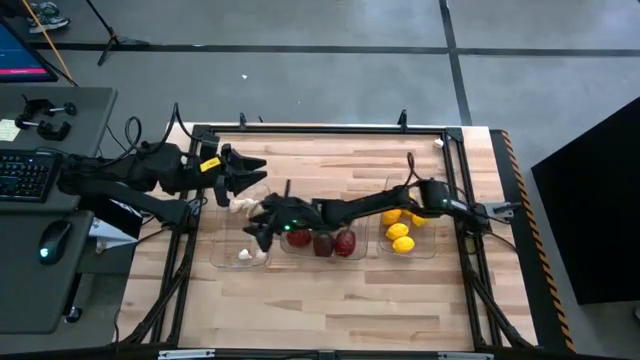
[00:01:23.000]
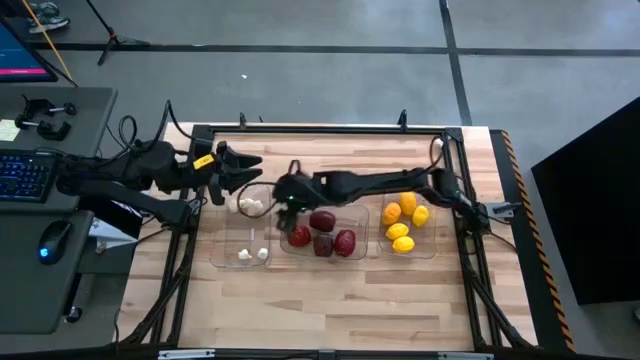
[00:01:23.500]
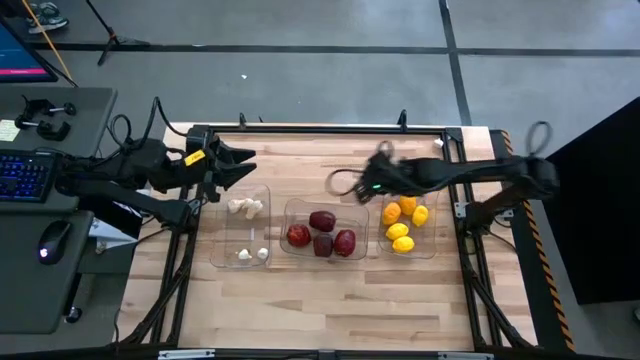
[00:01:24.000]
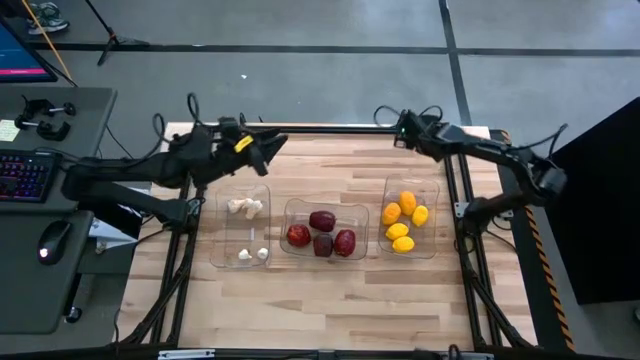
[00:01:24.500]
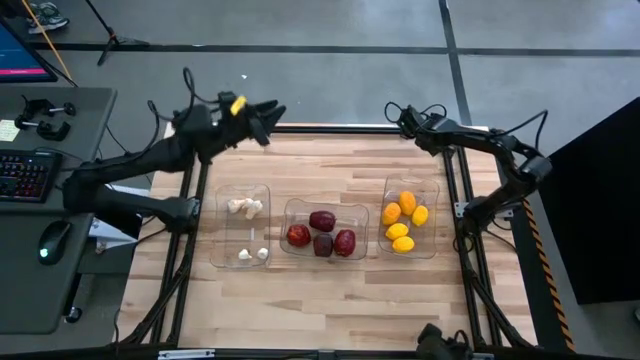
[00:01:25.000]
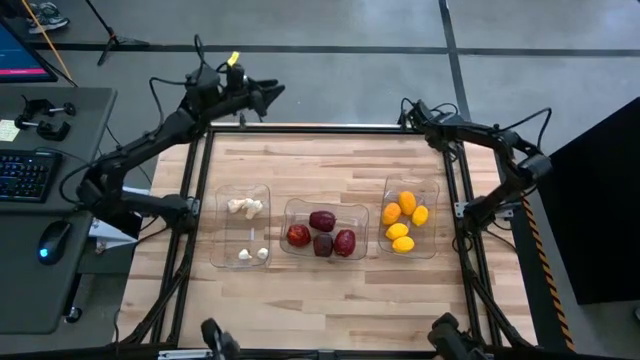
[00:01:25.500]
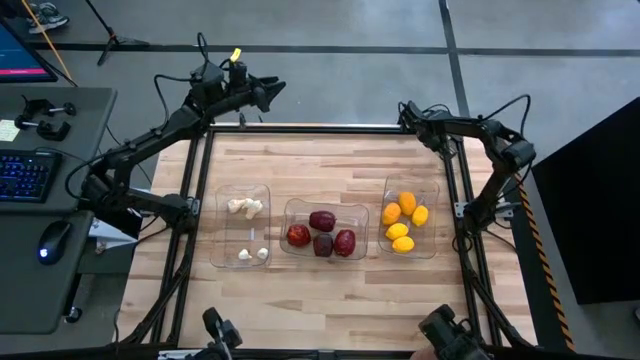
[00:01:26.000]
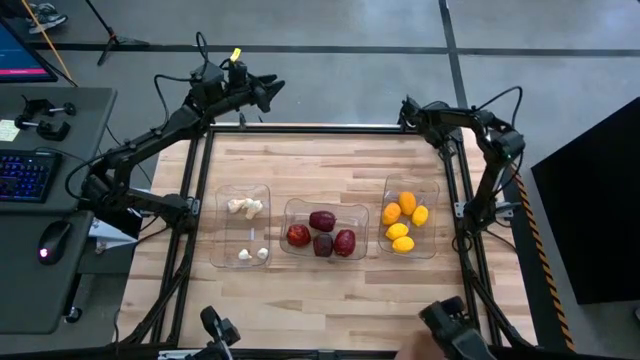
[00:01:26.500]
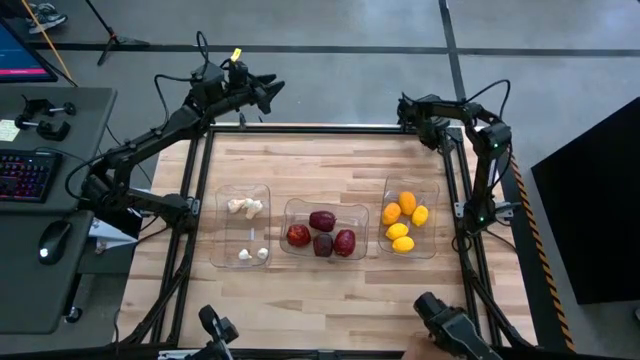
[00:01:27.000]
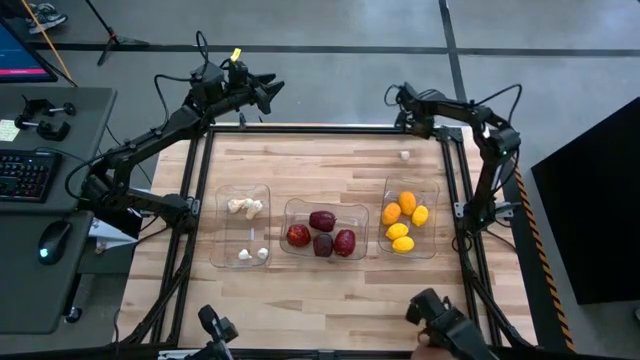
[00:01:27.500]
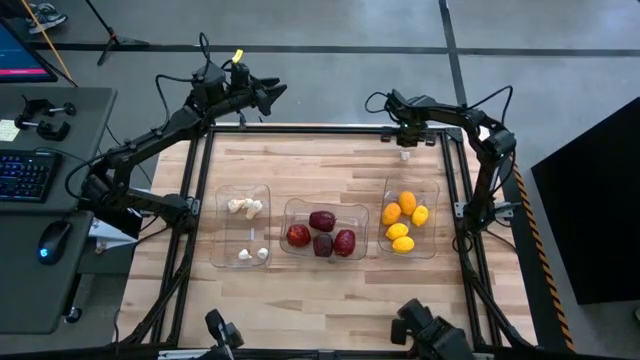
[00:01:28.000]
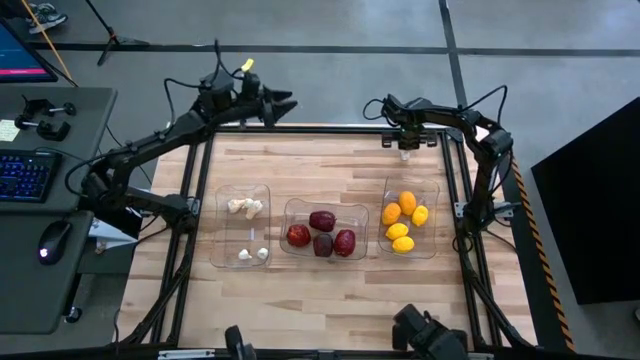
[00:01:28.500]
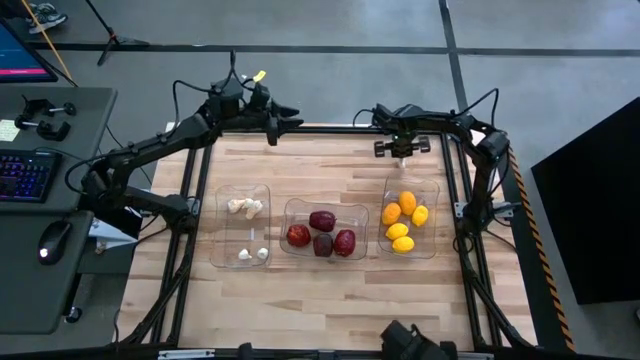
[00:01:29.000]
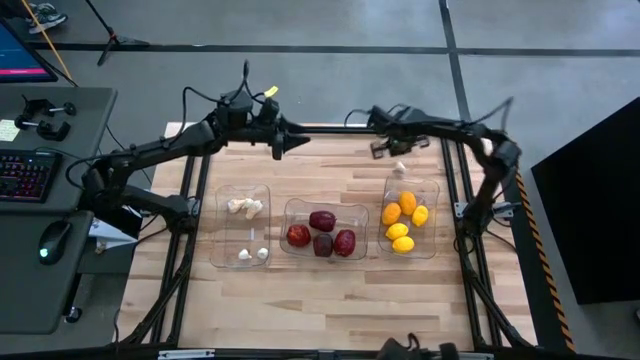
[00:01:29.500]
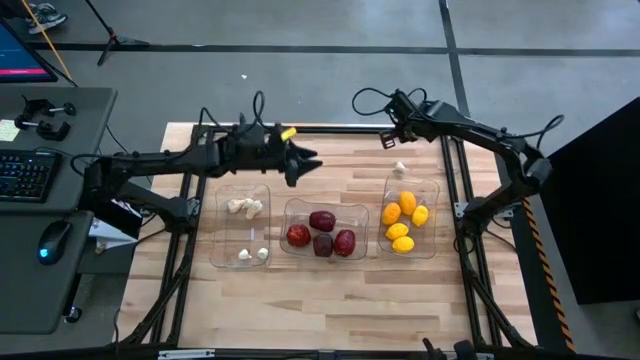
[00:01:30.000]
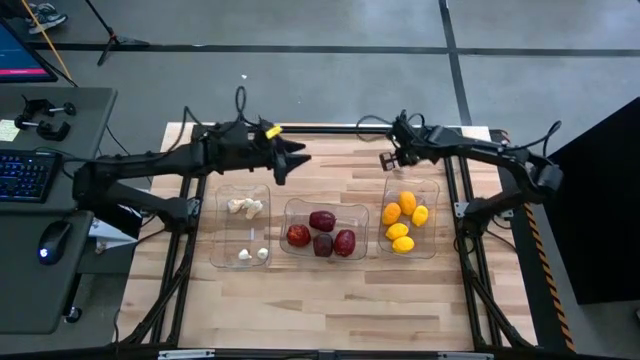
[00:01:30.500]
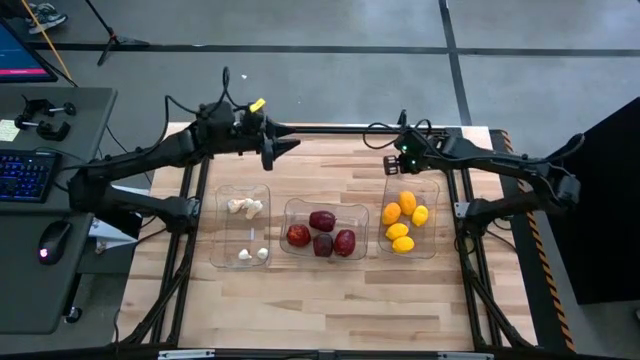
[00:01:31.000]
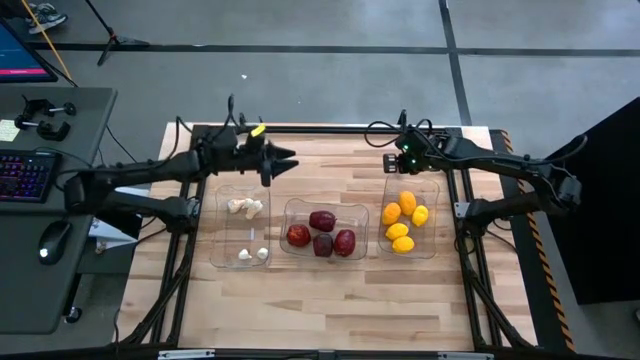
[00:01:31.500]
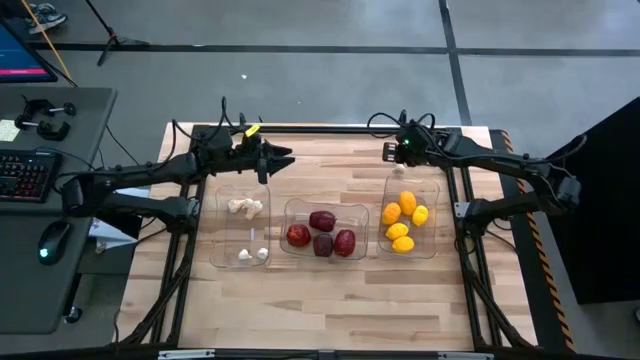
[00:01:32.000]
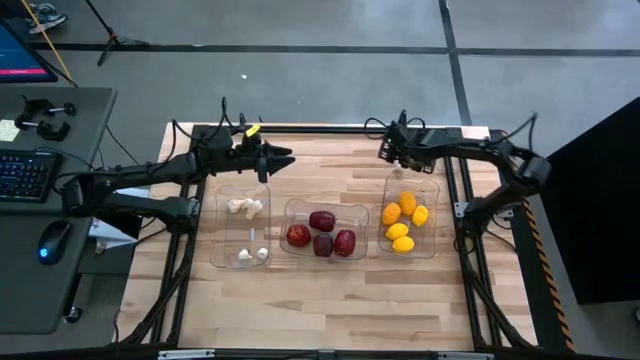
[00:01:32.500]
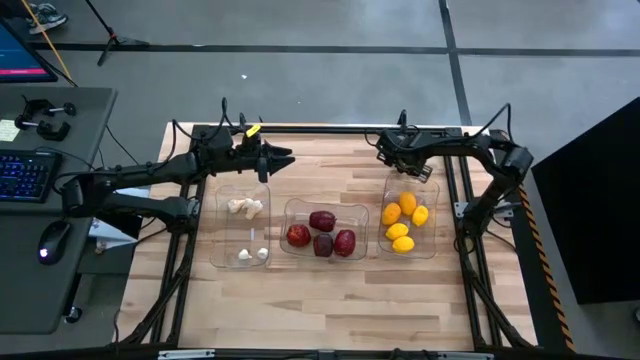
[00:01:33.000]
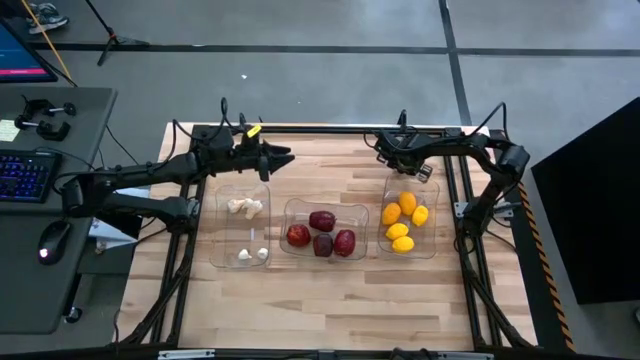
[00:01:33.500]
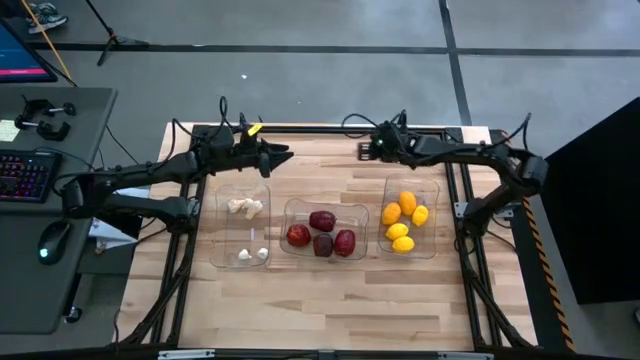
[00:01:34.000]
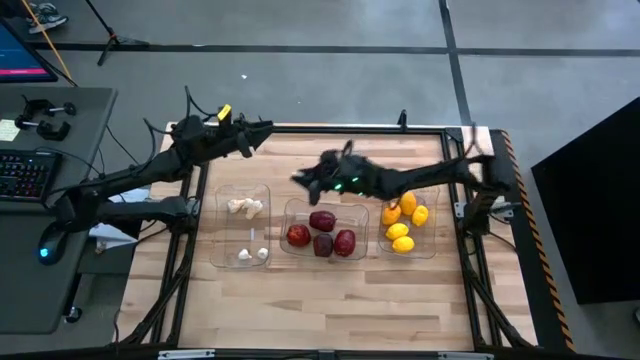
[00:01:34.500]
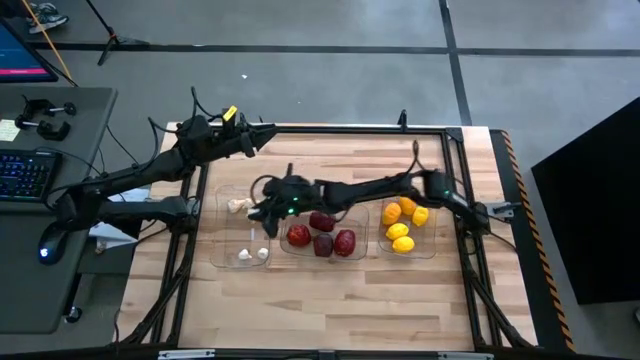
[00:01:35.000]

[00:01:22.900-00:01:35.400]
Task: Sort produce into baskets
Put the white garlic into the left transparent bin

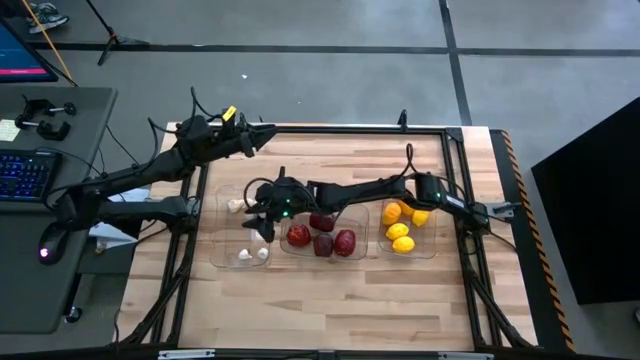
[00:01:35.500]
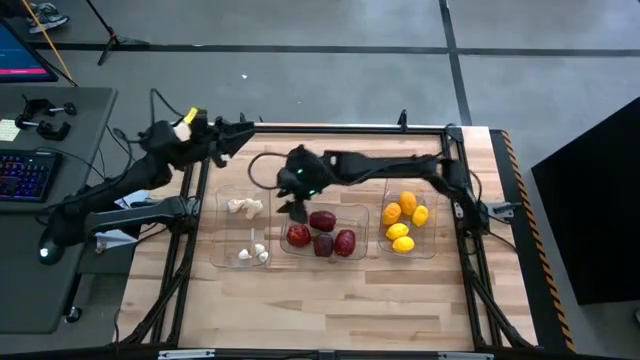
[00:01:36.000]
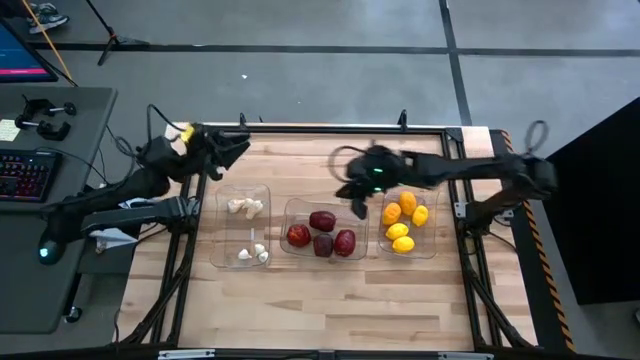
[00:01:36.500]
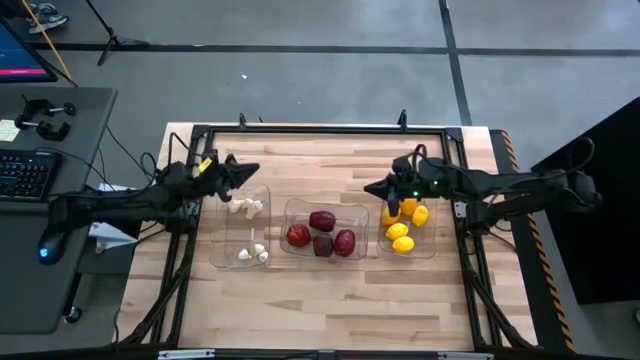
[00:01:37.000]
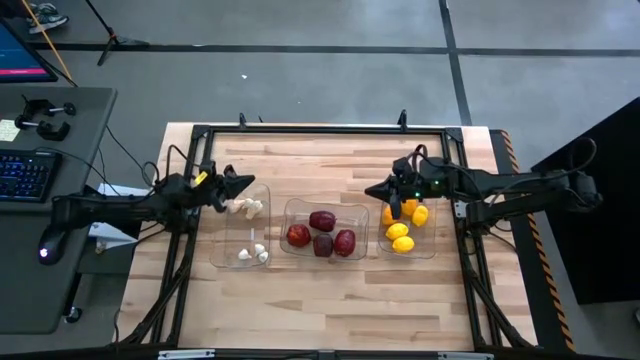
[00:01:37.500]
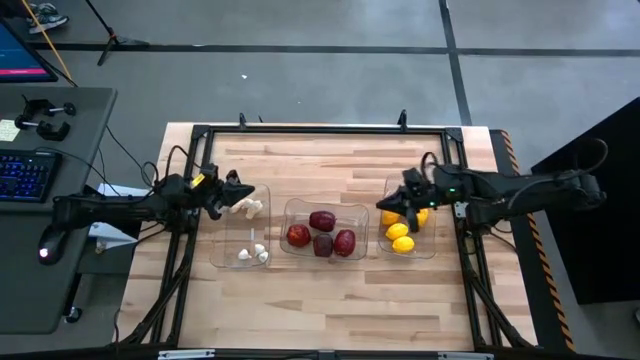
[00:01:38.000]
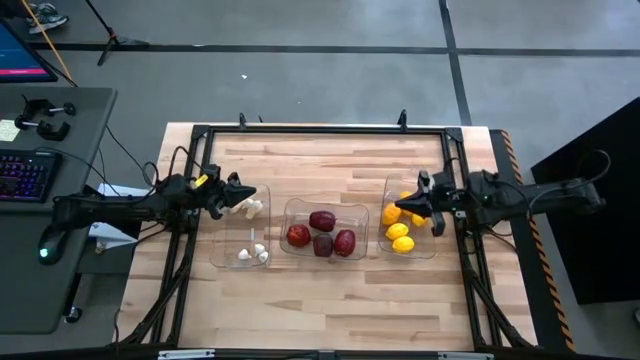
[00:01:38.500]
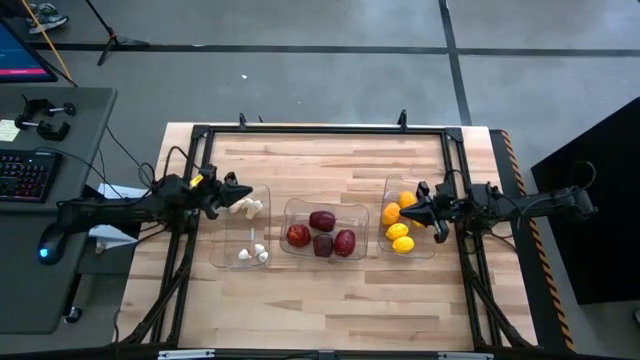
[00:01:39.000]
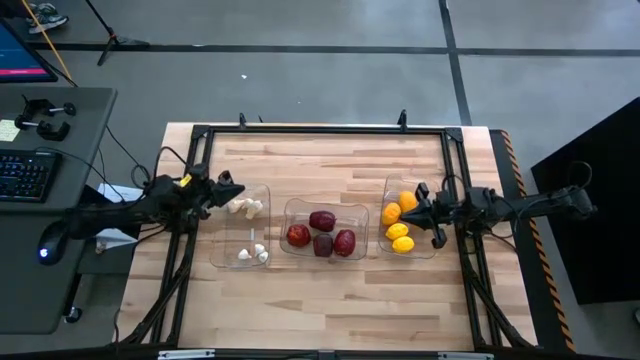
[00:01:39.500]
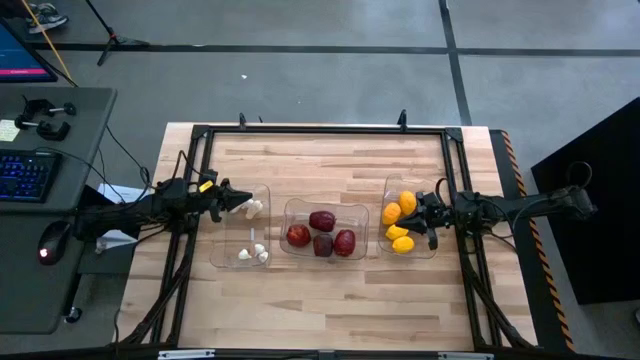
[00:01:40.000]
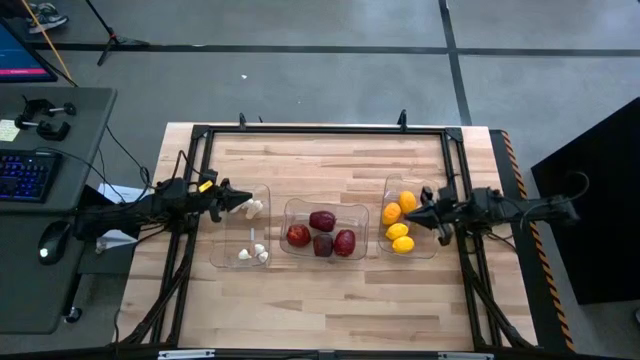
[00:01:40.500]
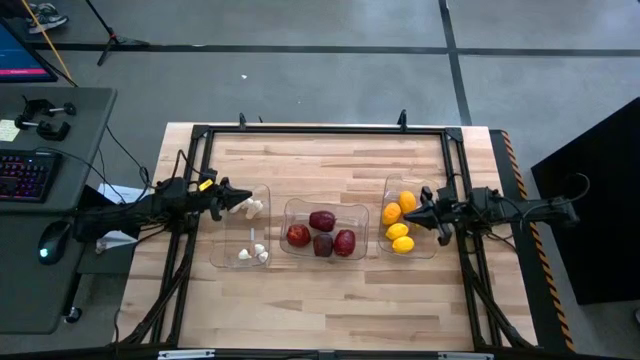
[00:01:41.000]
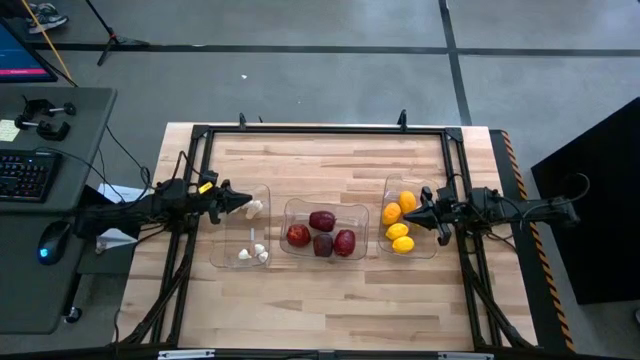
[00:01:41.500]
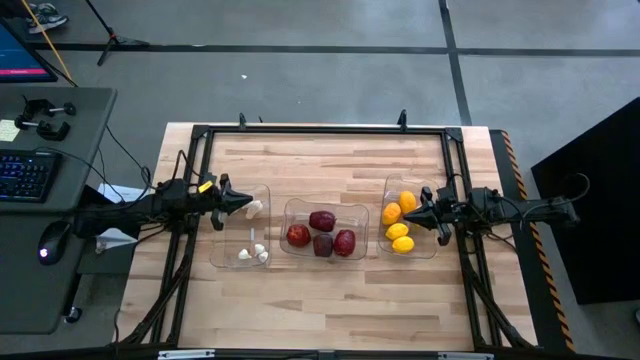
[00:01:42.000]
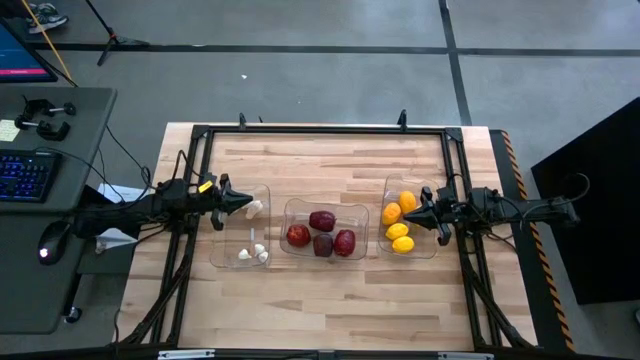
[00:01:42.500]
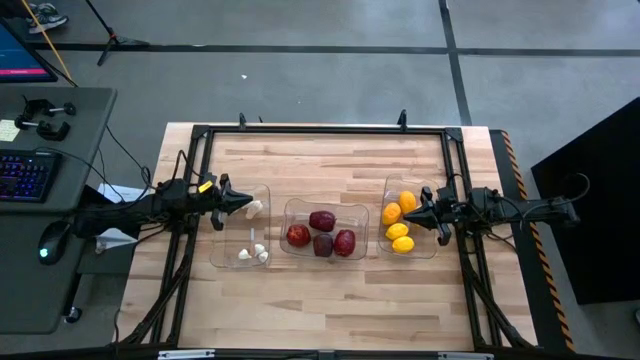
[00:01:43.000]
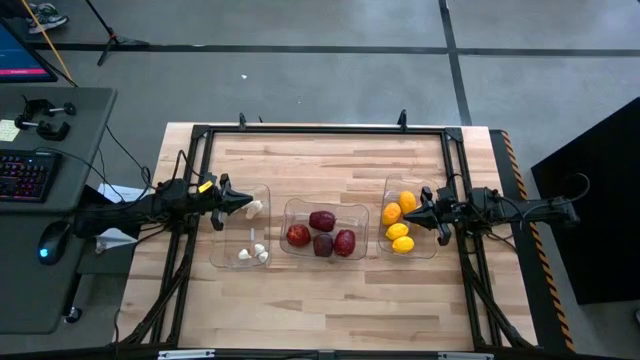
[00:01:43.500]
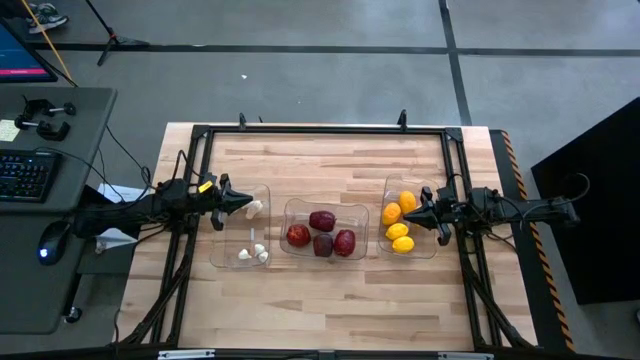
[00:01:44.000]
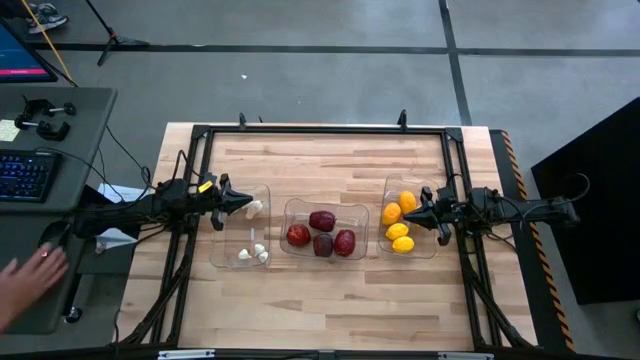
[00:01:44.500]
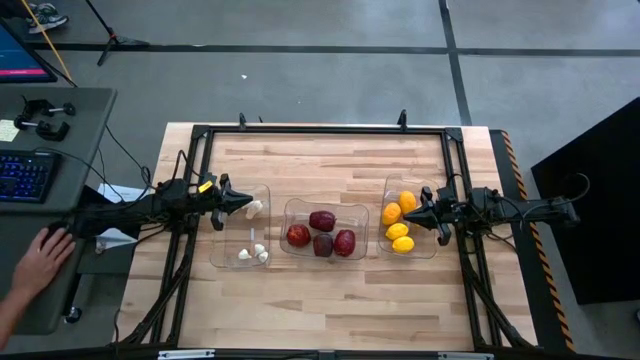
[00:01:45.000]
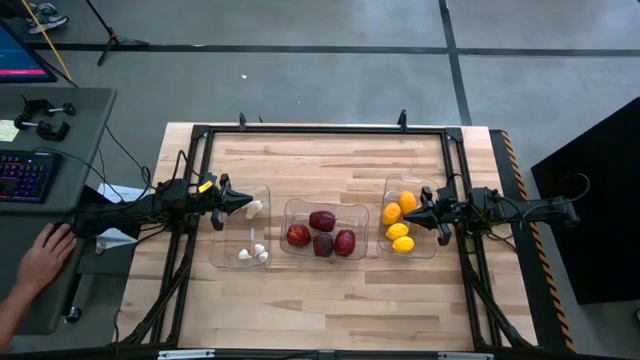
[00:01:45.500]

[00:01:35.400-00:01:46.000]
Return to Home Position
